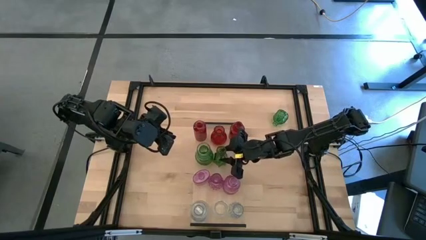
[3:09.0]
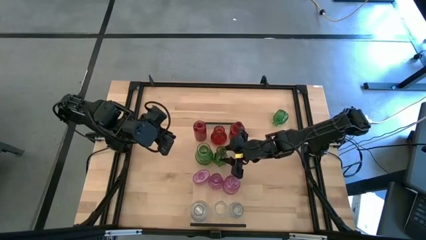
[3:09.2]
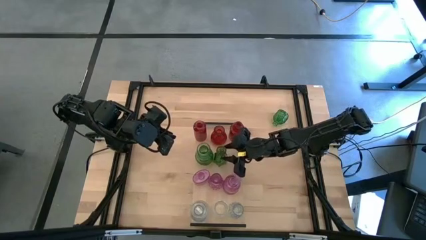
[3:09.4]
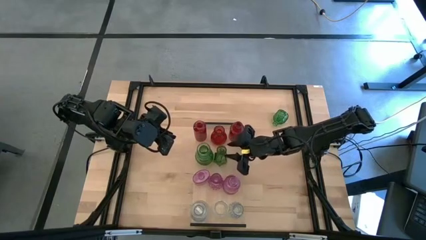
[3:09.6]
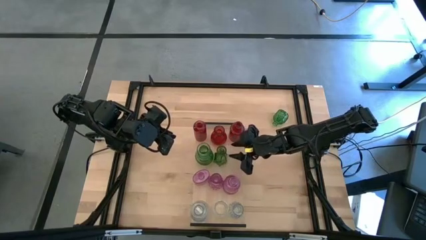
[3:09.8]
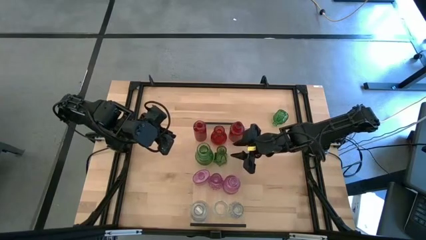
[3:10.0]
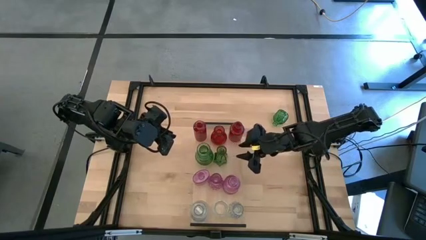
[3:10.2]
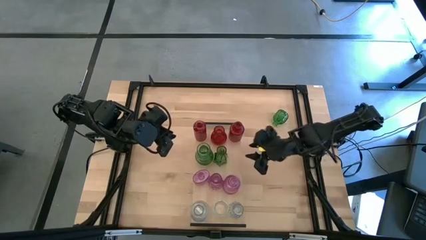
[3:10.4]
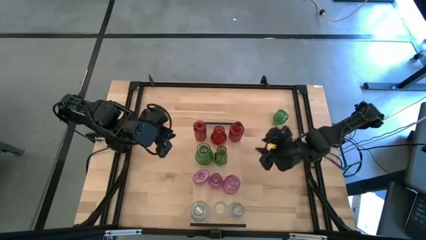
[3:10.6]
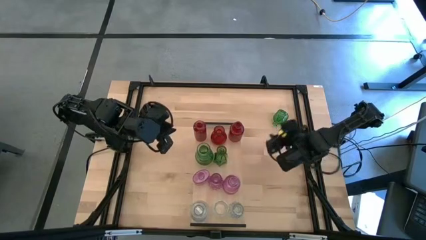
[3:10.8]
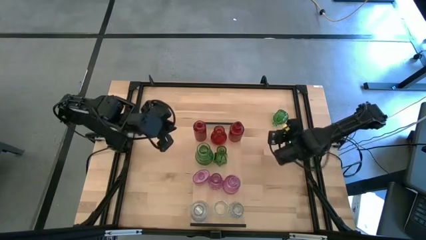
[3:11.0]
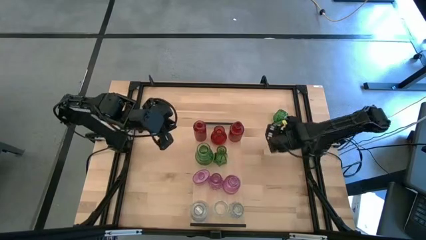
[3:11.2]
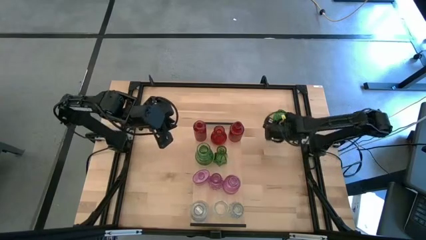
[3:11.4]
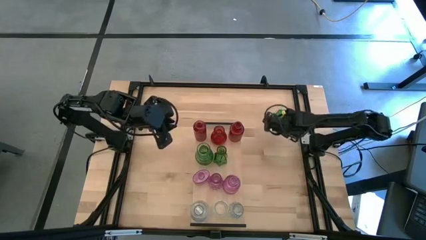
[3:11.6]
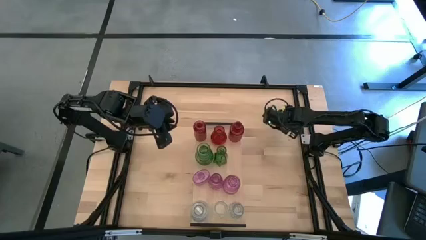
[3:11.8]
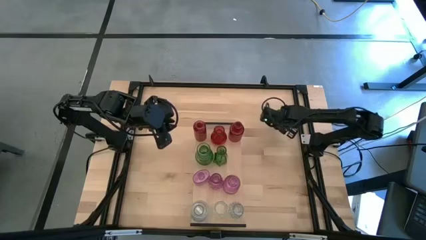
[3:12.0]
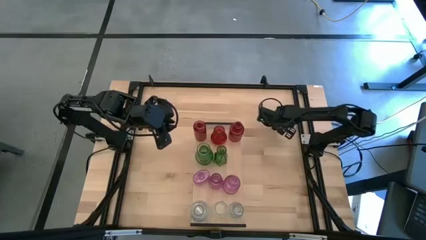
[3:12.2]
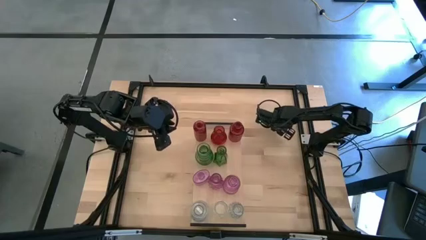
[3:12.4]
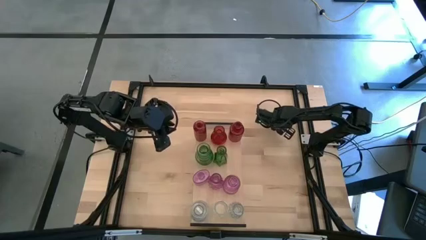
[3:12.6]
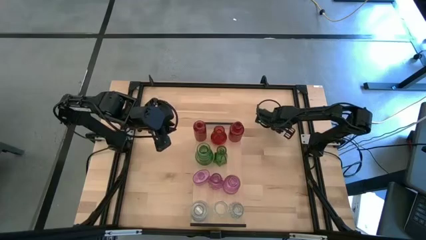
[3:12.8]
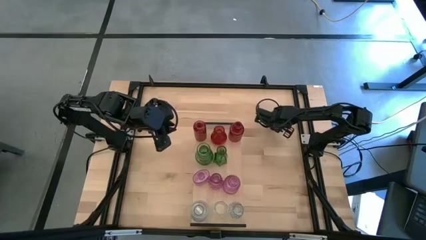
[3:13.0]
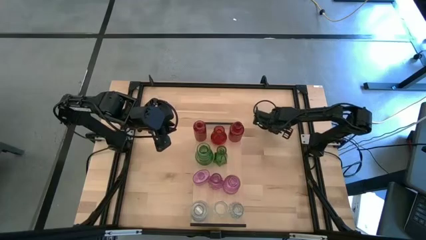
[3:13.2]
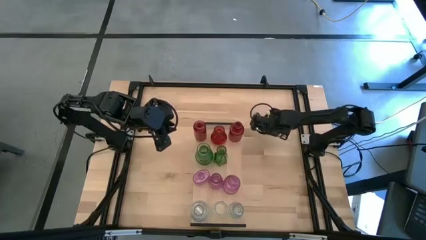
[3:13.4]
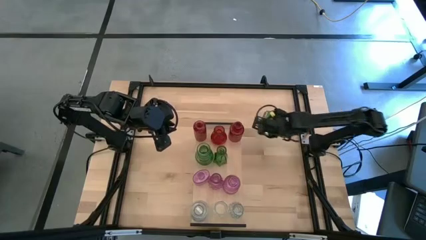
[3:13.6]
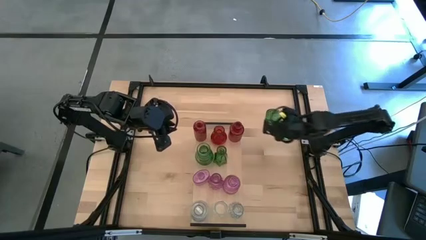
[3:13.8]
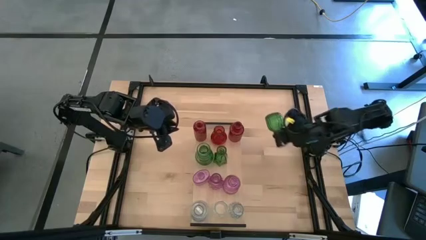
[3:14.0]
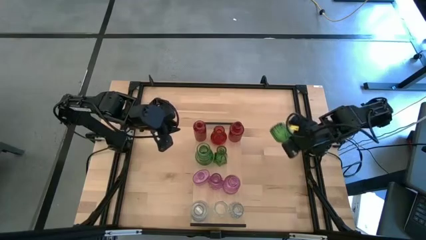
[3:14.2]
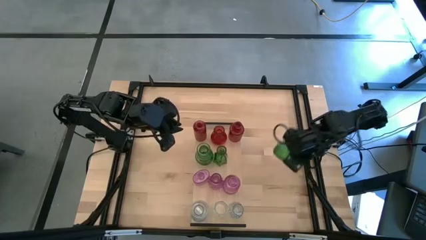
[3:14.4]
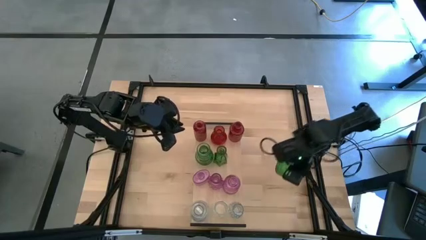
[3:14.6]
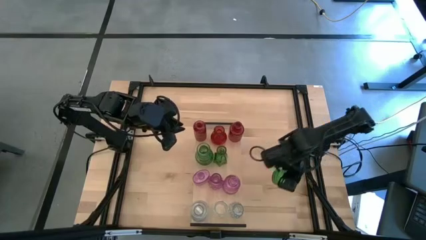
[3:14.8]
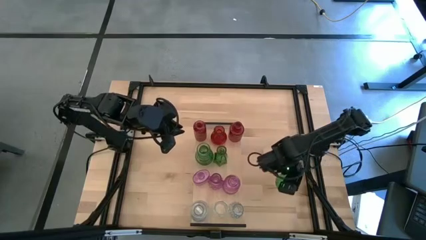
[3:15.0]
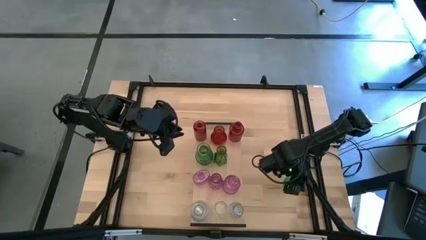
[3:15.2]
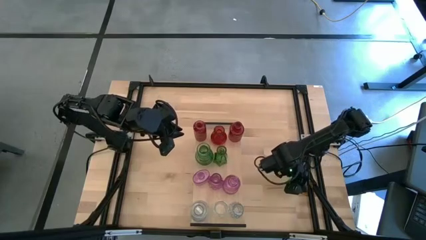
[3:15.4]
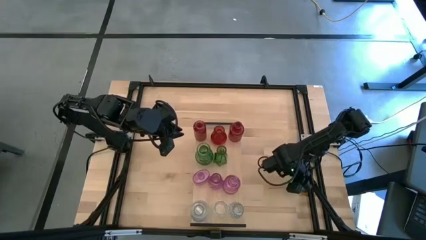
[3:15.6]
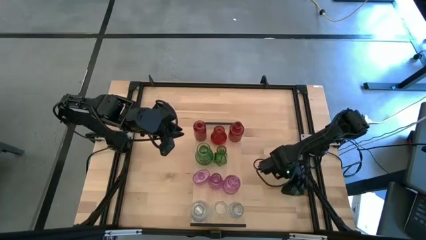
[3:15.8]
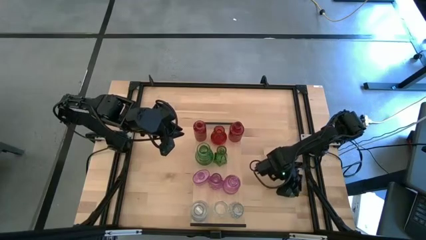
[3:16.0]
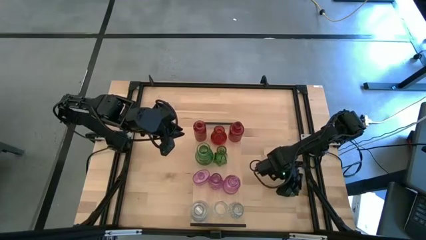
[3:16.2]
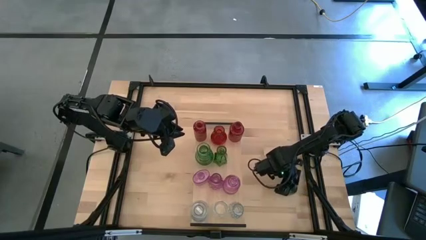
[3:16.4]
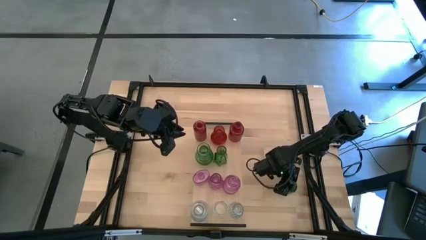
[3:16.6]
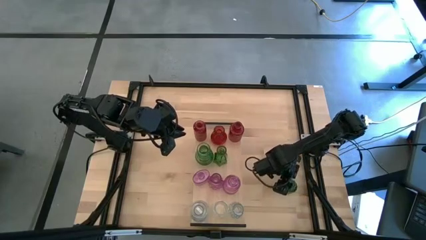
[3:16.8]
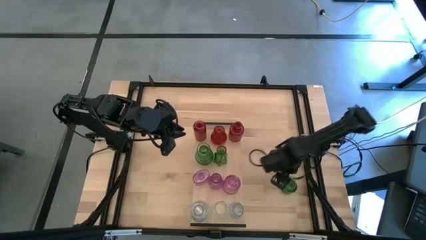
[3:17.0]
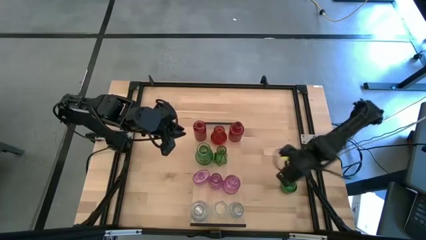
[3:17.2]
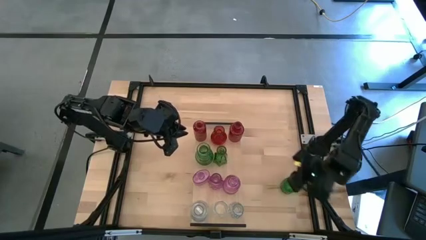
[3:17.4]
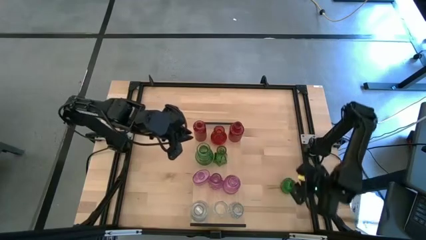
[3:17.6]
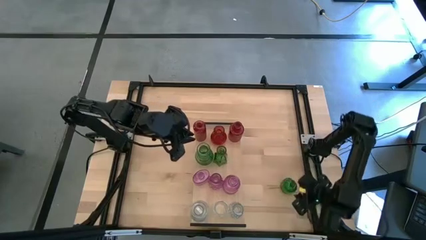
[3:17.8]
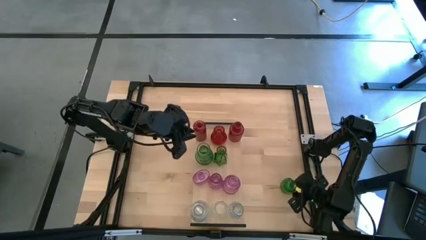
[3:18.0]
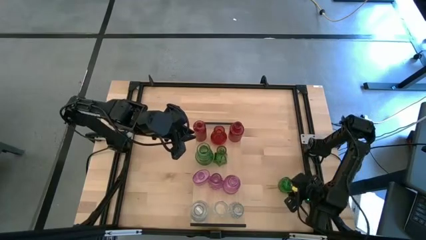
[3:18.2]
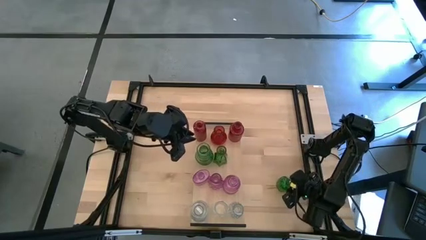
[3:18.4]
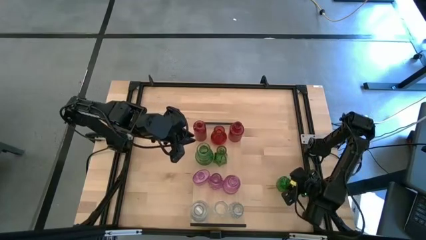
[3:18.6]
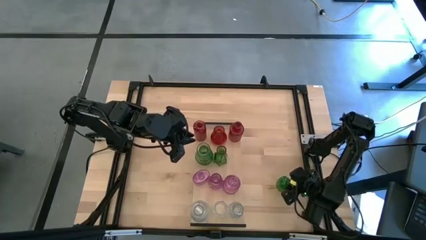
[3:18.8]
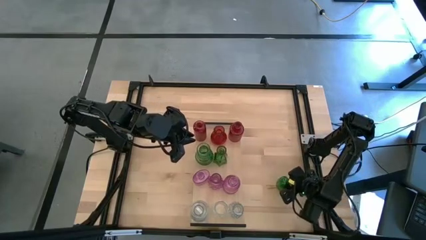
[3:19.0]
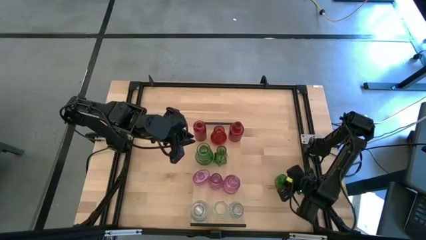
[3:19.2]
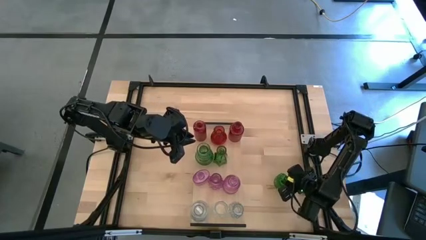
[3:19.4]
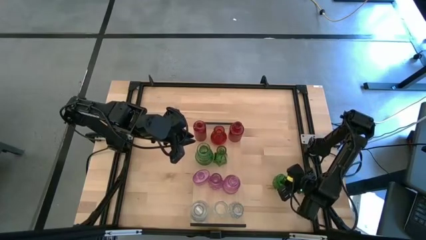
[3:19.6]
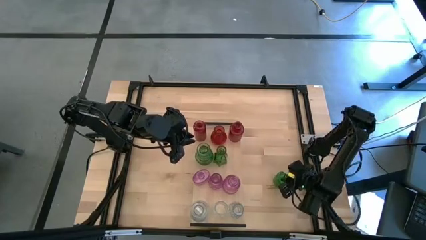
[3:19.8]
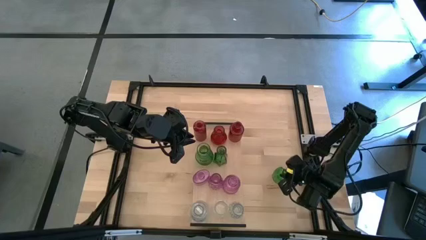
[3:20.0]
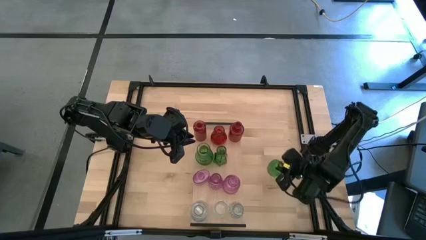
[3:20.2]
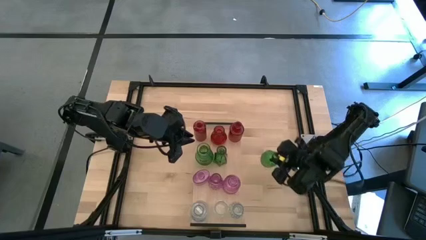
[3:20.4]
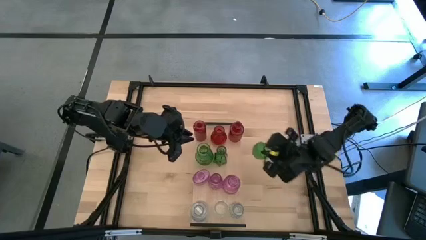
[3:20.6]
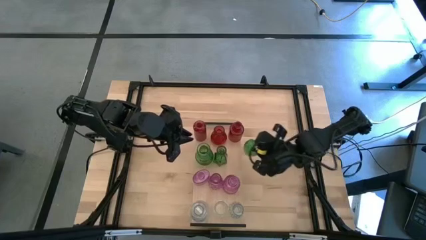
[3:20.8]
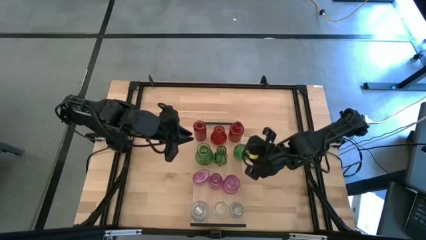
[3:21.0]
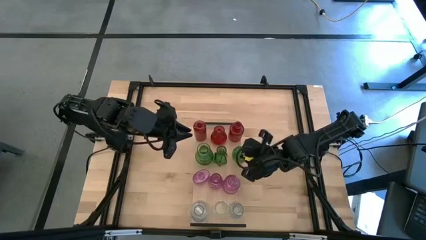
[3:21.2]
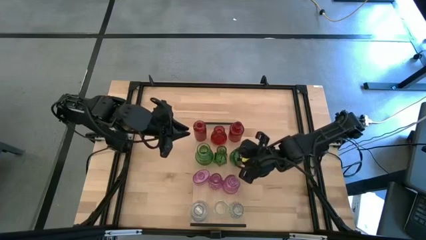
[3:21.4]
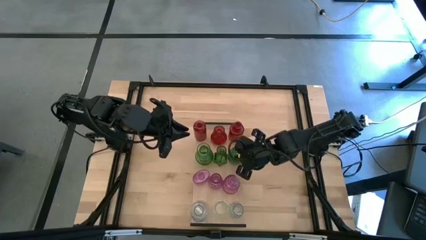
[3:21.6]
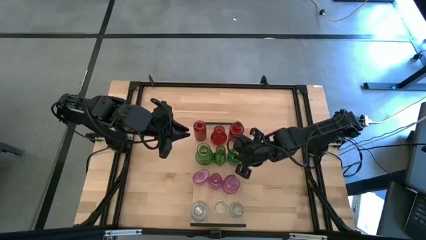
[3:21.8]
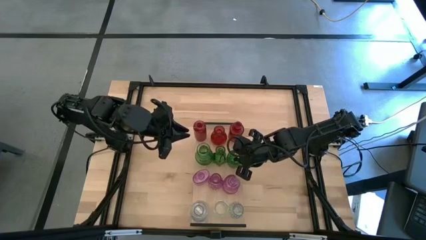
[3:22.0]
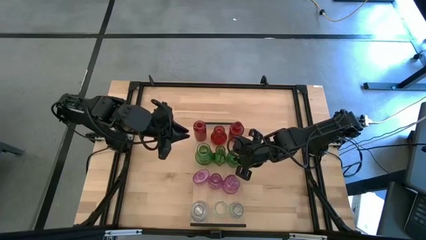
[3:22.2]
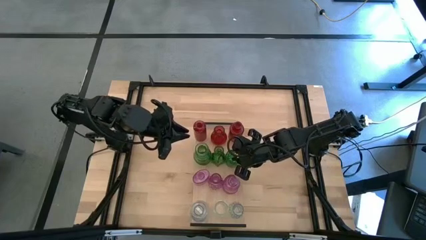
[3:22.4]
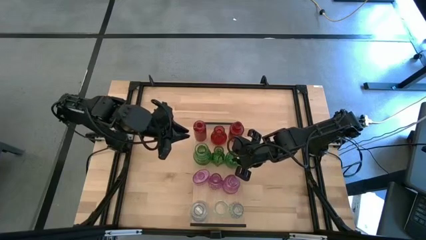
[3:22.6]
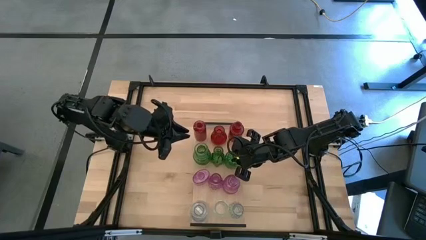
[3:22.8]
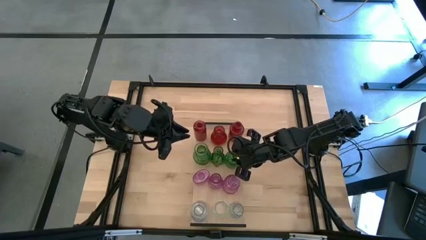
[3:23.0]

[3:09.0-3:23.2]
Task: sort vases onto shelf
Put the green vase on the shelf aligned with the other green vases

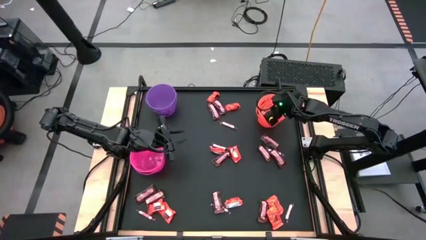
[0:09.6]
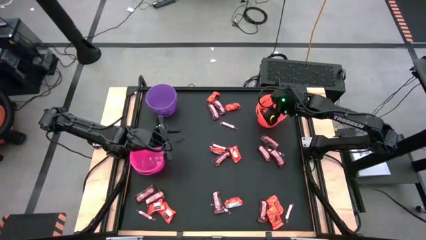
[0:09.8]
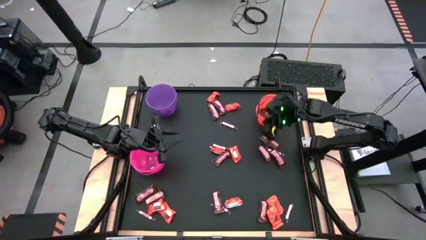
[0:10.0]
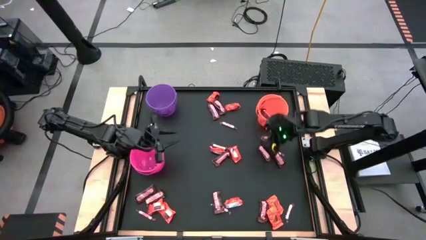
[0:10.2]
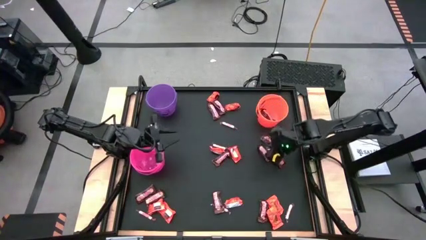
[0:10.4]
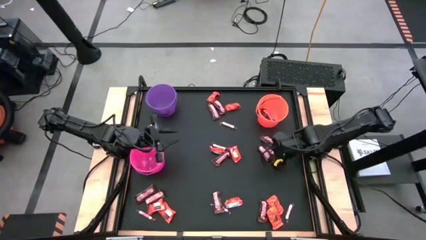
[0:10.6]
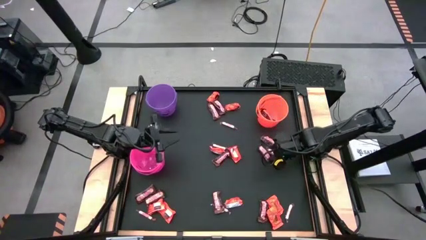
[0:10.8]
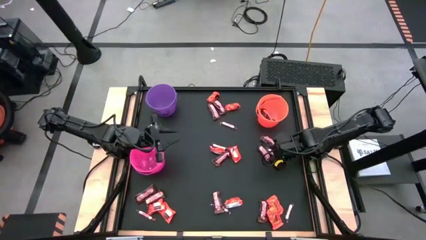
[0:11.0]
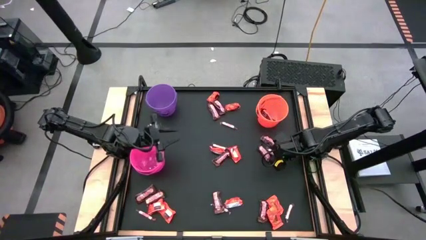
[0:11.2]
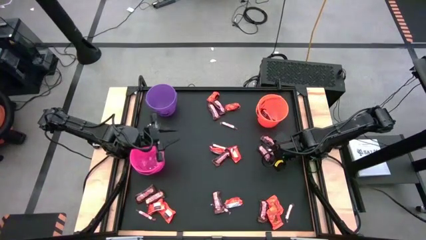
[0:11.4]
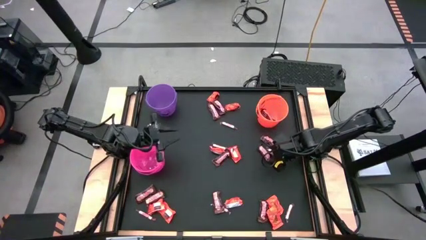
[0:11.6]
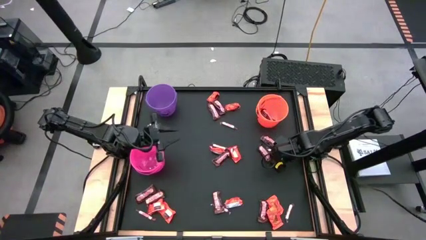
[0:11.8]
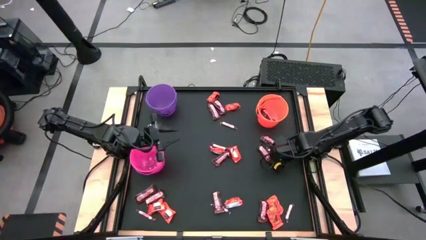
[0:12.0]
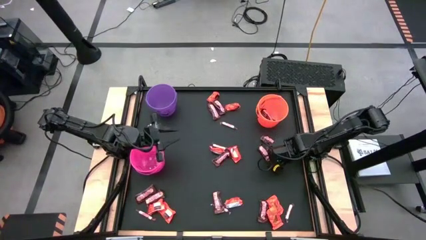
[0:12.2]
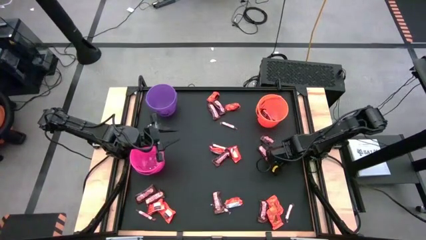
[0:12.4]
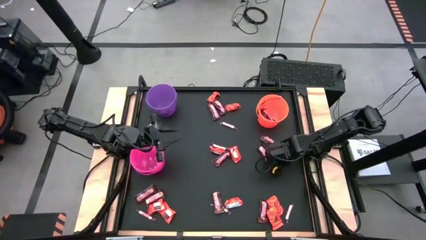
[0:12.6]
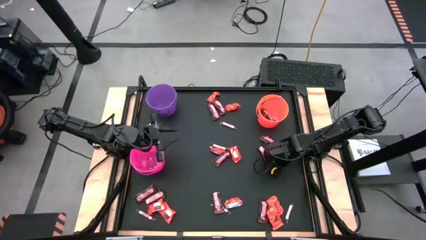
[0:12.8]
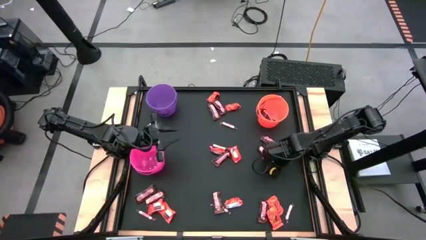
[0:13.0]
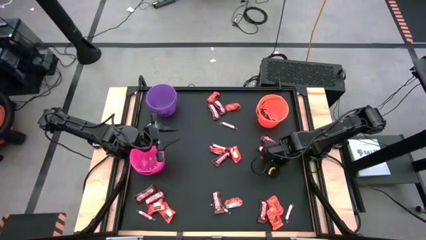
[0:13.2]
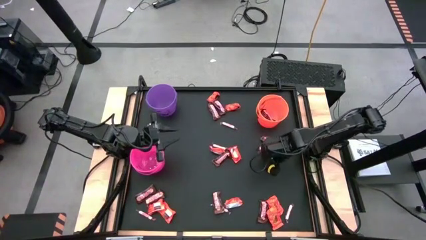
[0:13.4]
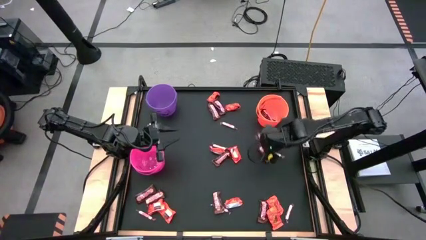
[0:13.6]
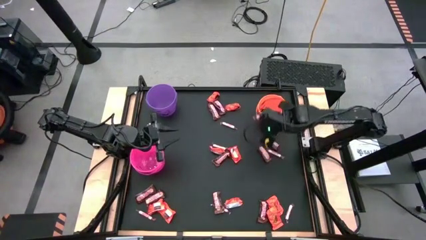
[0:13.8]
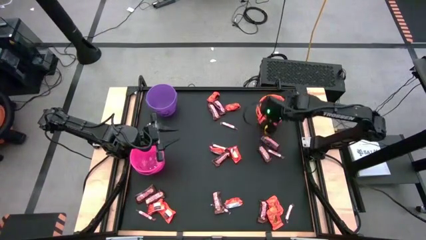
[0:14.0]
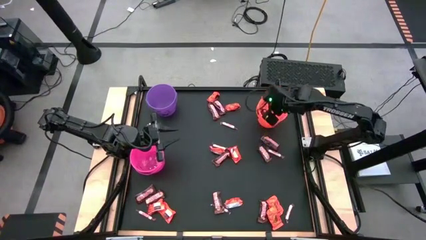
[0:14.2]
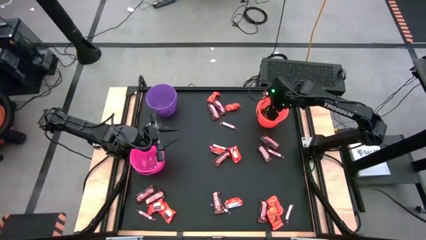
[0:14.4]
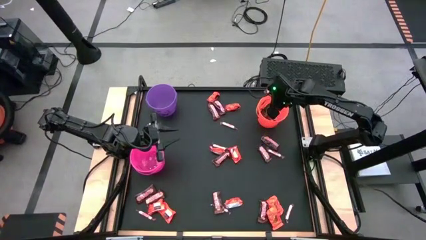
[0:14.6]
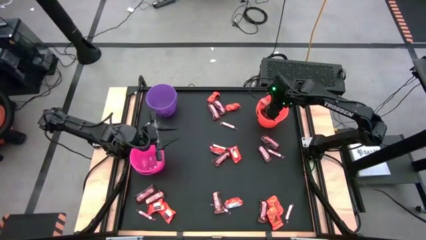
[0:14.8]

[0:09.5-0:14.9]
Task: Sort candy by brand, put in halloween buckets
Put the brown candy into the orange bucket
